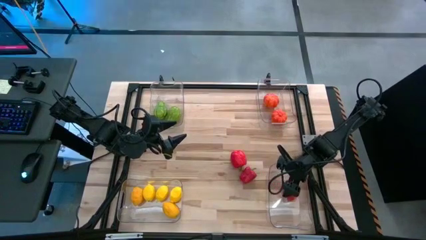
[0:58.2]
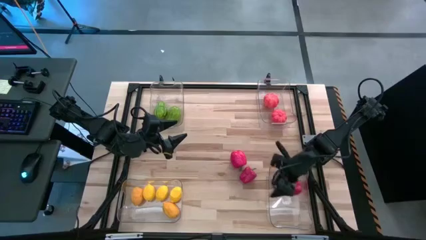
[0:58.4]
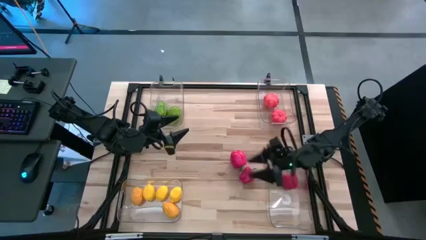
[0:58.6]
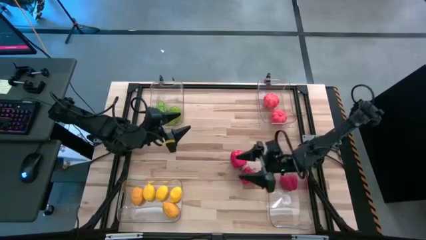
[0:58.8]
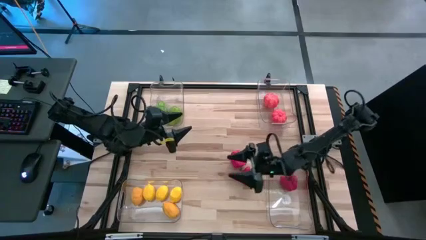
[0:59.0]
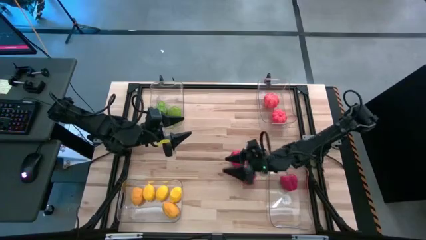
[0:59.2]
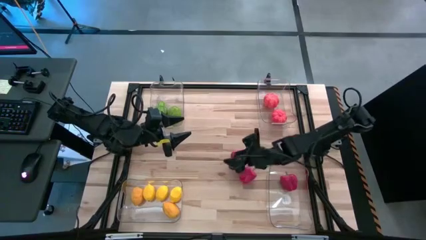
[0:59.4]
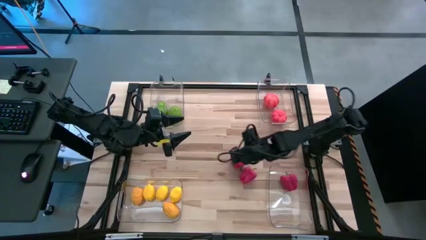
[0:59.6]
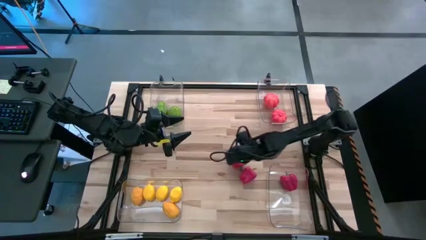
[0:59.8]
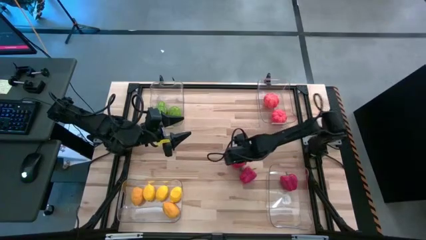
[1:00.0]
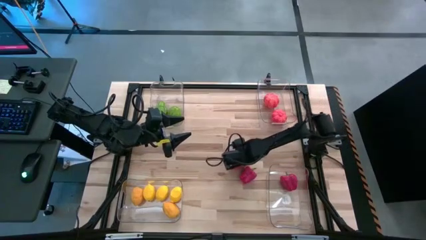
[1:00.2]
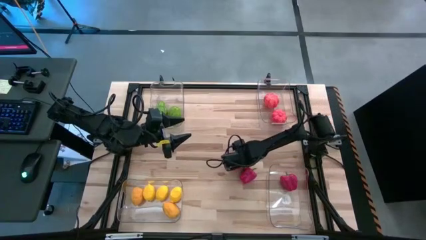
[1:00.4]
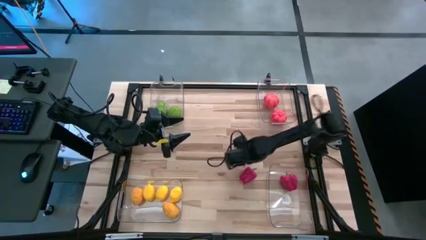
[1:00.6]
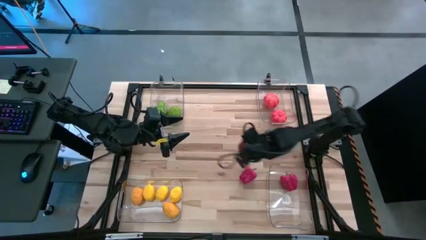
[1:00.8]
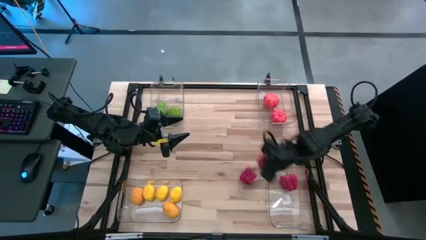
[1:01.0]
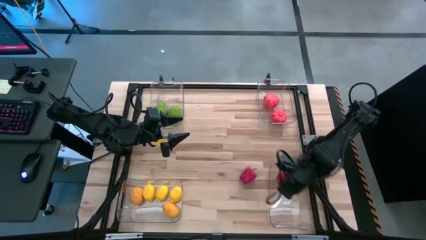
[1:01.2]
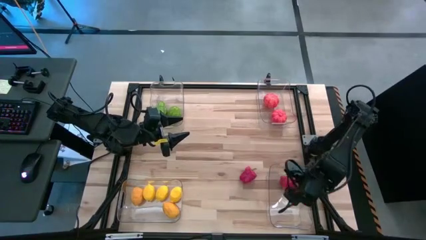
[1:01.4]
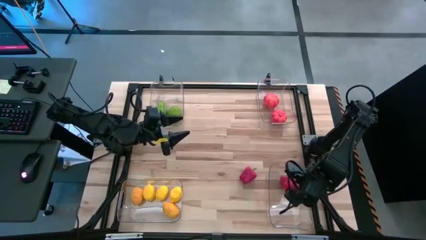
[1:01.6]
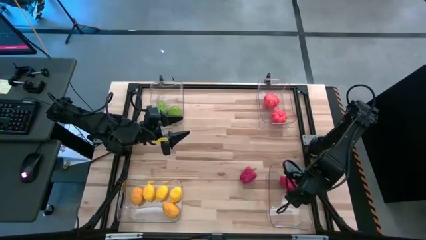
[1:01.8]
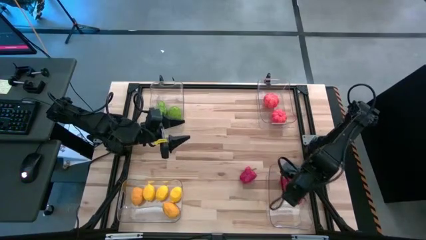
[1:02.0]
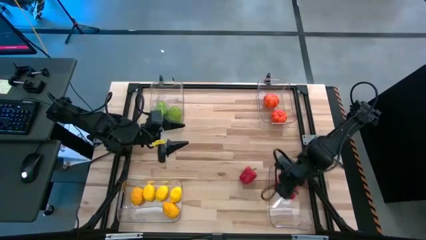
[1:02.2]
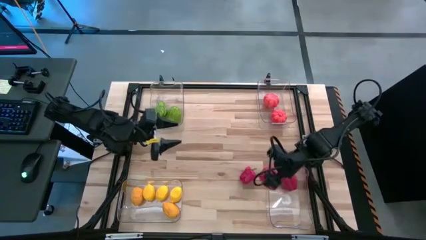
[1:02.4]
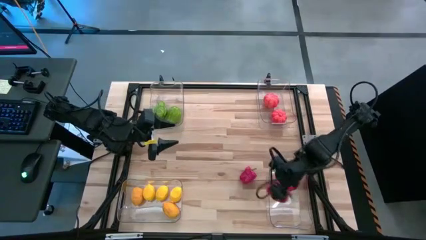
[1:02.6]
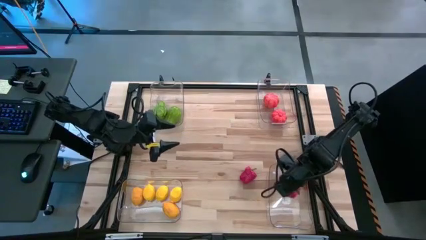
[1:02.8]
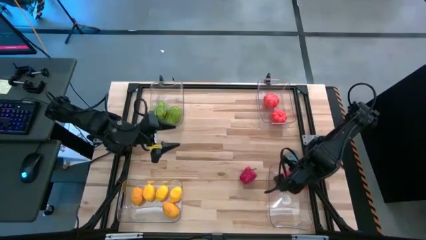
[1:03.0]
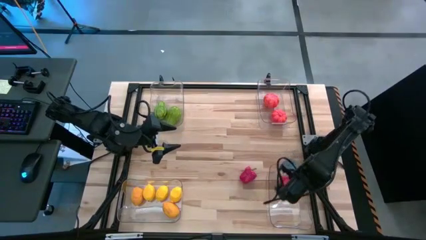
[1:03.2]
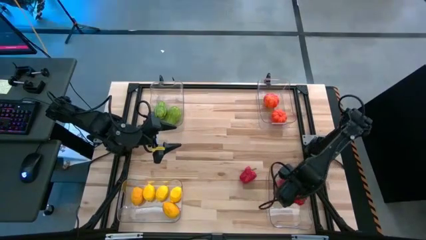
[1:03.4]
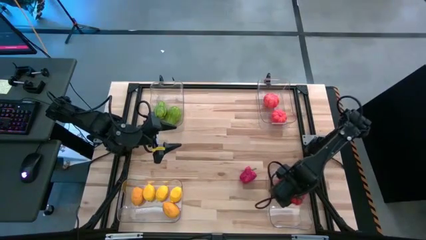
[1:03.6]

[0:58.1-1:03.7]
Task: Sort produce into baskets
Put the red bell pepper into the bottom right transparent bin

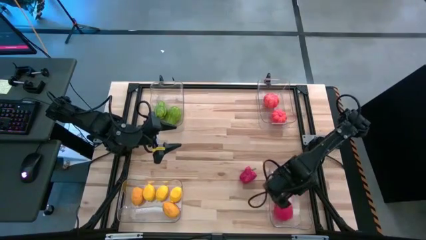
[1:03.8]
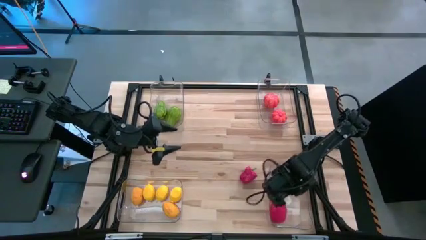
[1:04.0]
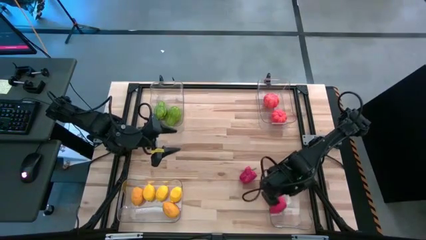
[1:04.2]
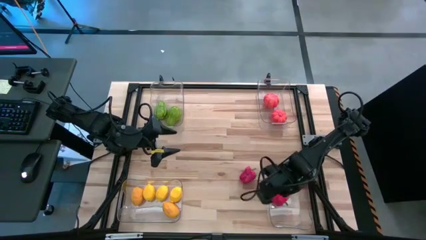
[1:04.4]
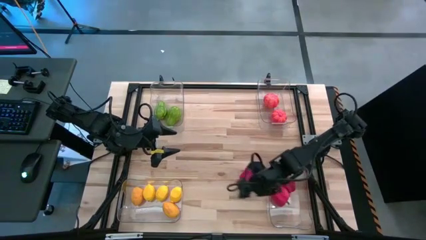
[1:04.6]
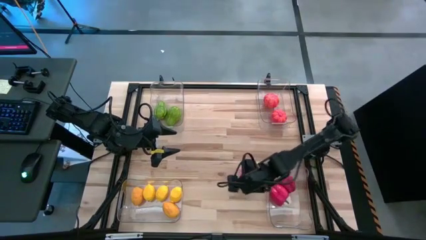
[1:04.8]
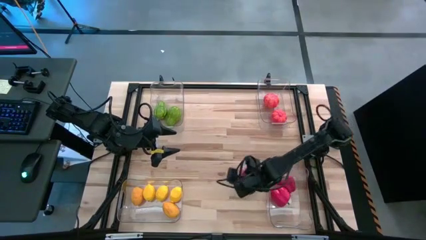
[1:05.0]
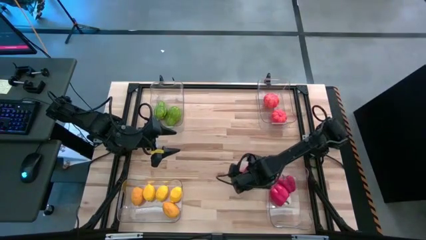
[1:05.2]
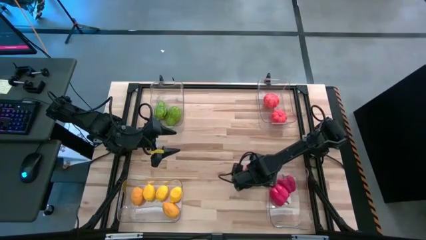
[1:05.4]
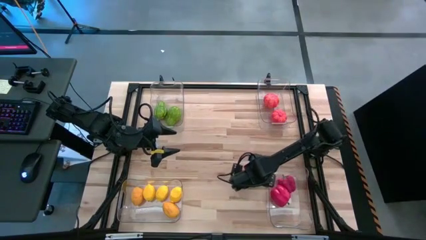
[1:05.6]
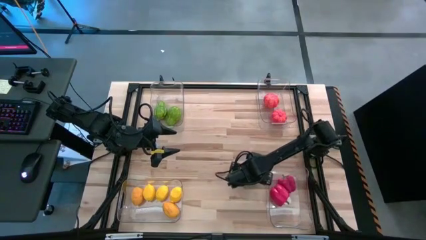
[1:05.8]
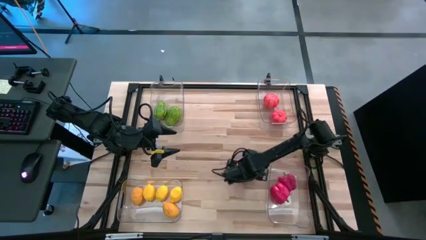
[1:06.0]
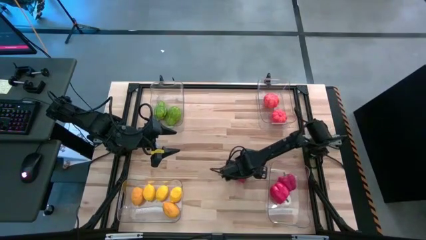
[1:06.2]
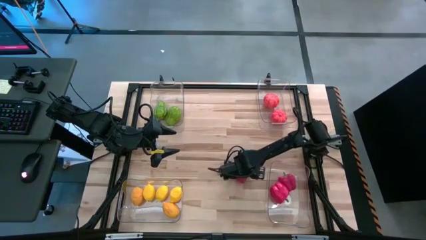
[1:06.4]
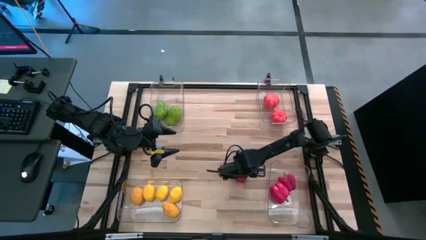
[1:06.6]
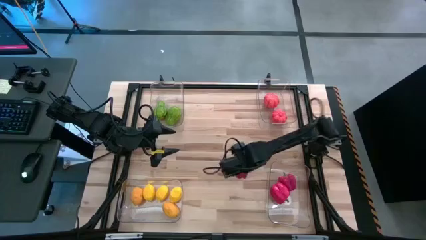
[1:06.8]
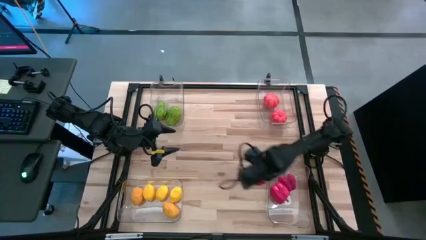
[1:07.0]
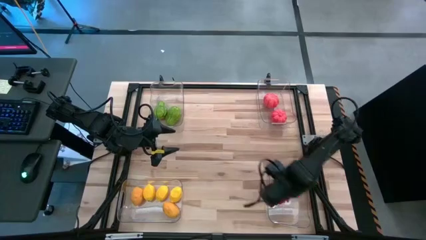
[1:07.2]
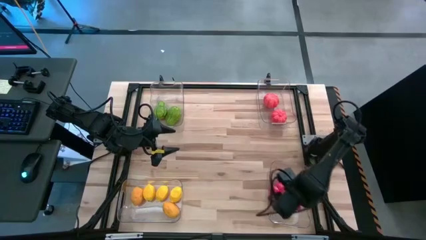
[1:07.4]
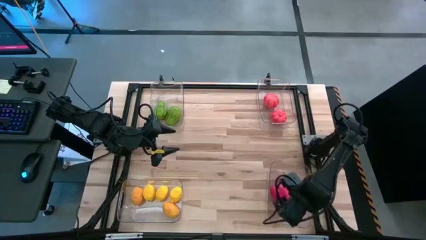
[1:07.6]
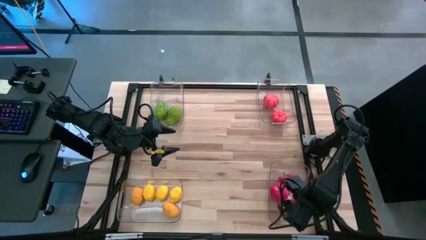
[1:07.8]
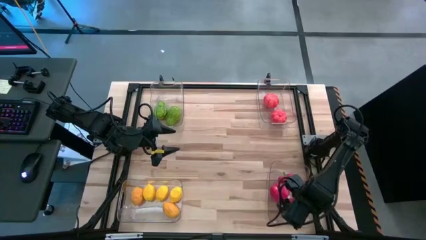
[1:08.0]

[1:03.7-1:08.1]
Put the red bell pepper into the bottom right transparent bin

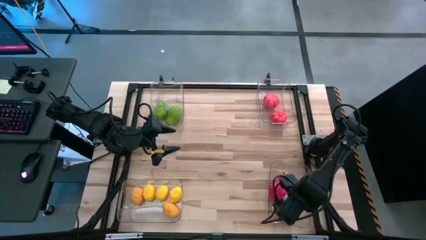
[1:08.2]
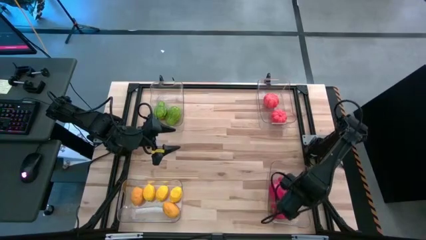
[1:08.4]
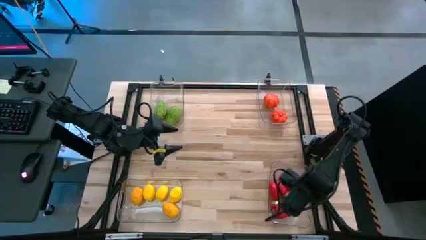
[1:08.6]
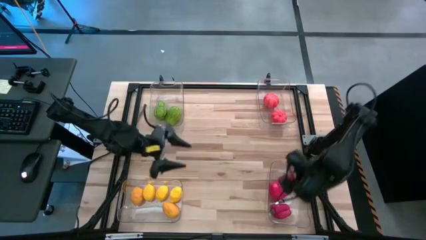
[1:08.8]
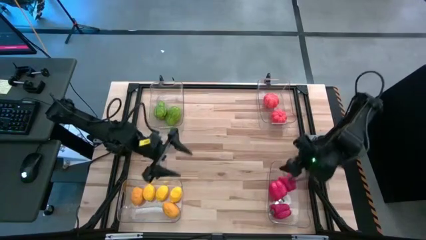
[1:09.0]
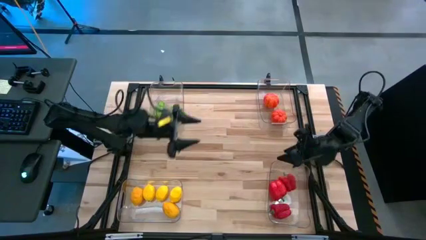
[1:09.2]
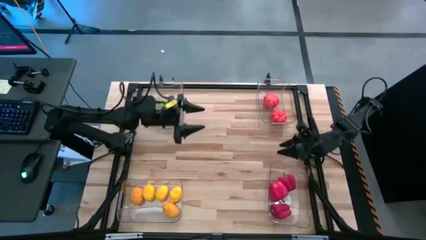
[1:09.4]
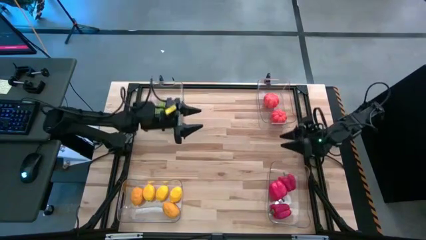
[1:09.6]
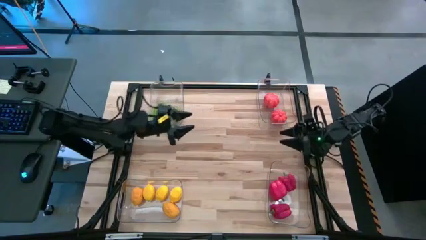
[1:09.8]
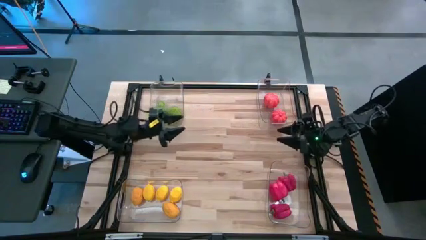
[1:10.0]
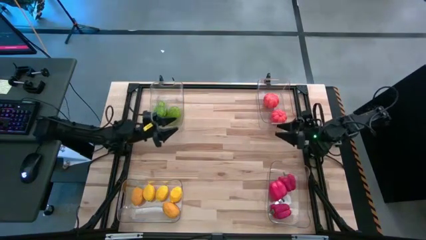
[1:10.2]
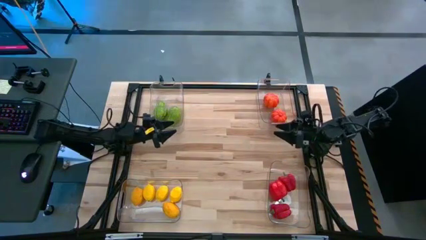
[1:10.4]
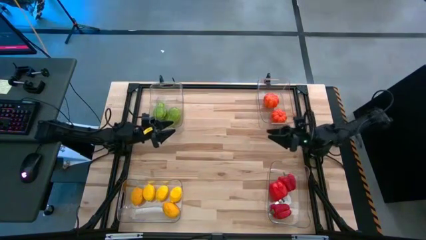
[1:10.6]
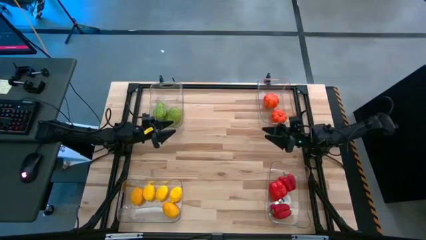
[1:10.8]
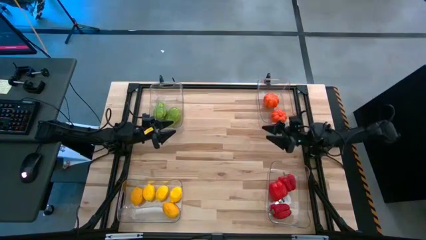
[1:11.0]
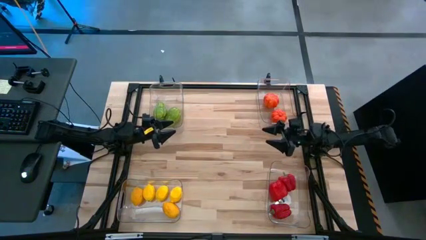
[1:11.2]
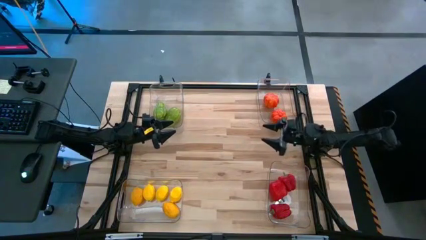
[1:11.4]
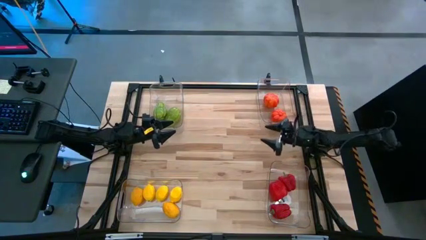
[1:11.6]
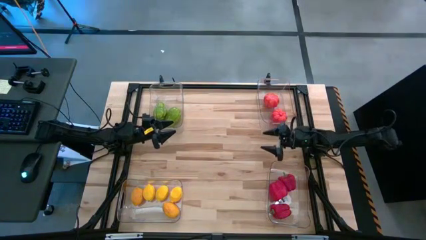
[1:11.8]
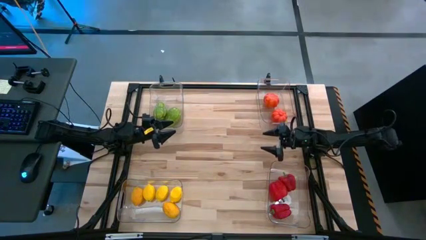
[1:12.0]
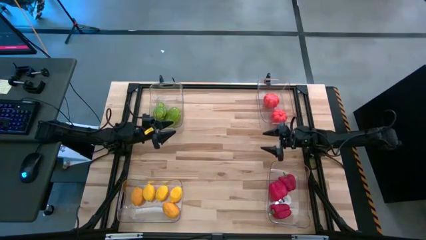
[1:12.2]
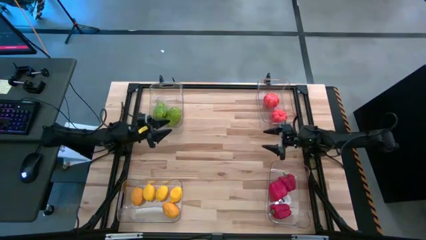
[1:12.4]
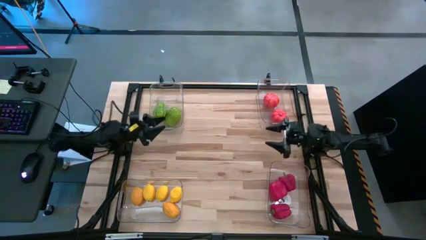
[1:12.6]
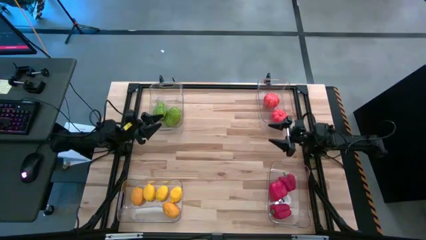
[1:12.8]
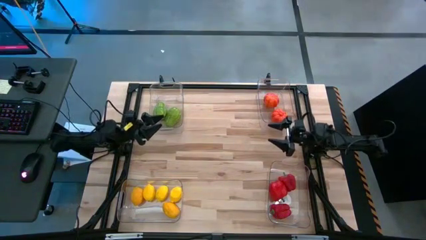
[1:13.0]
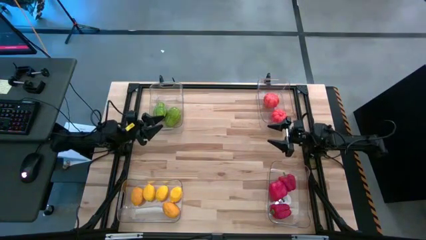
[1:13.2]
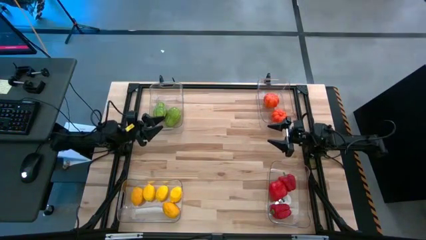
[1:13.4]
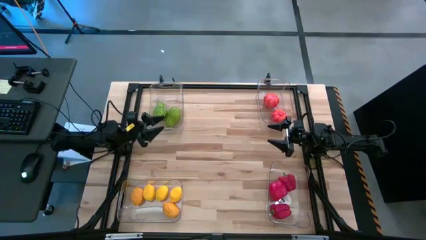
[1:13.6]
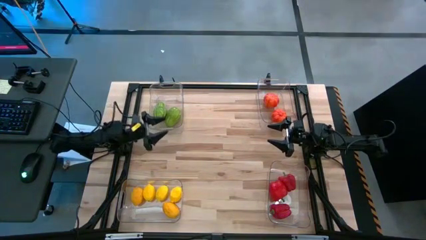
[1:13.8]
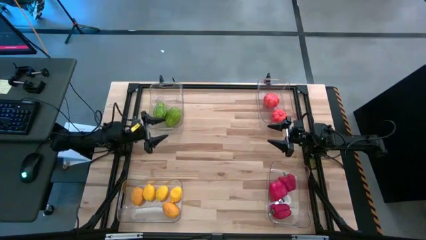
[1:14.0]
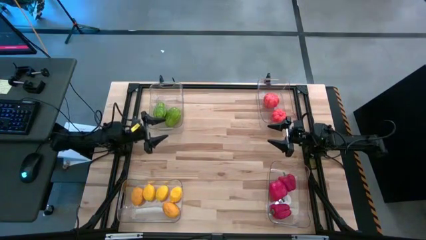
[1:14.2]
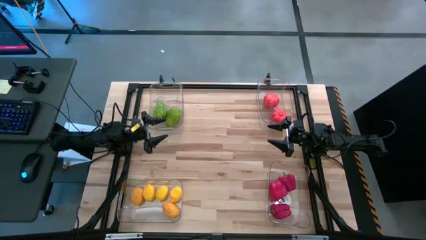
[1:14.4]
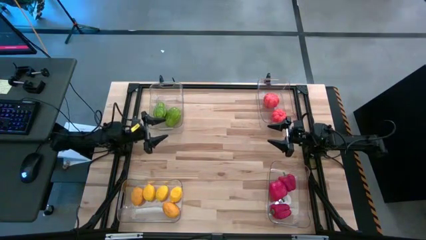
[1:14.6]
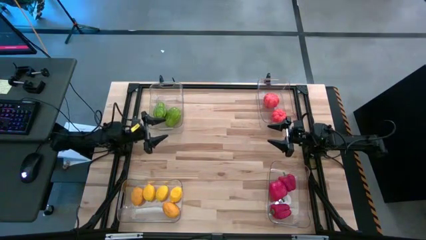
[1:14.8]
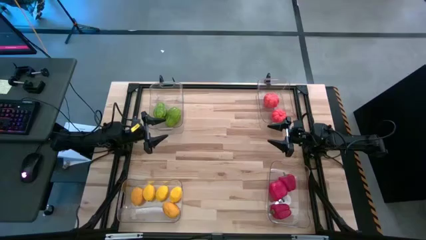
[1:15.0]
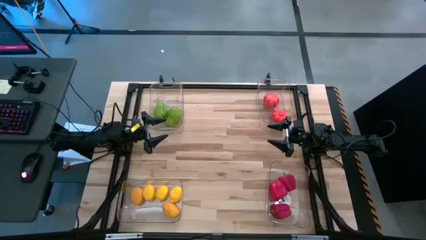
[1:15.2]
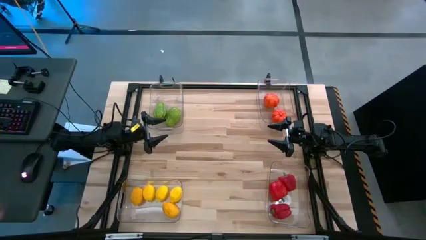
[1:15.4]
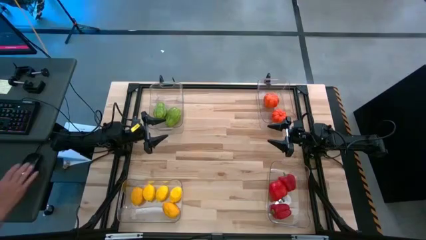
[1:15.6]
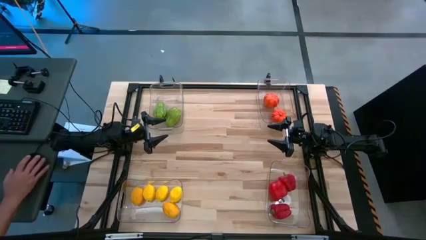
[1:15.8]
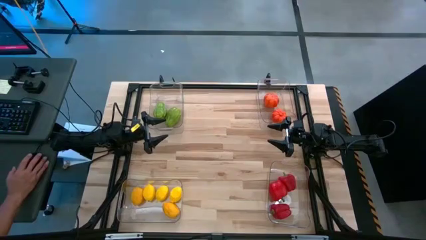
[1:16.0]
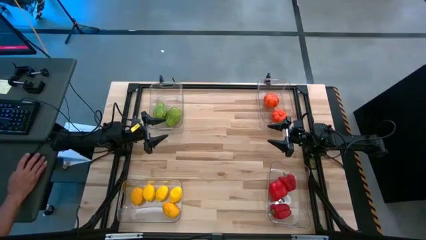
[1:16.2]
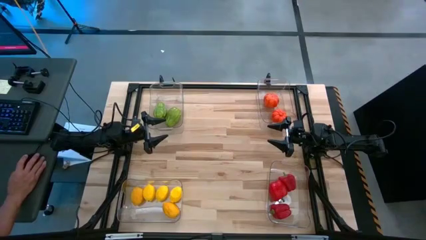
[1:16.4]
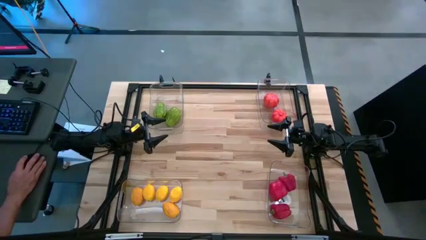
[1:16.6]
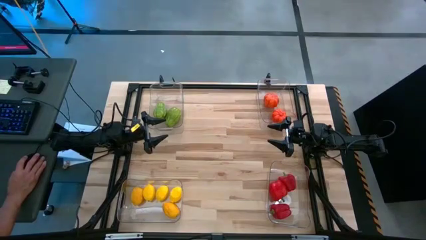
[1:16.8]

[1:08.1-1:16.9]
Return to Home Position
